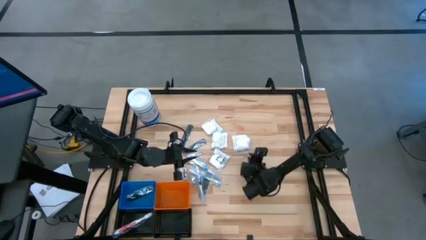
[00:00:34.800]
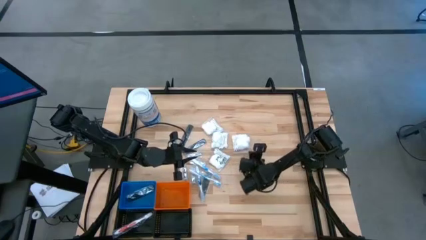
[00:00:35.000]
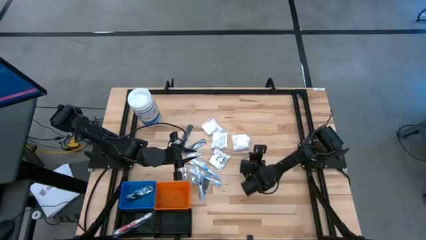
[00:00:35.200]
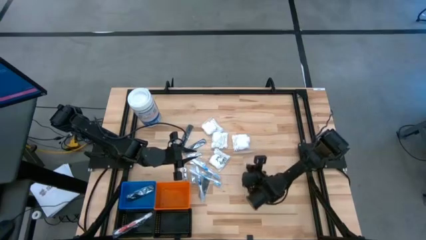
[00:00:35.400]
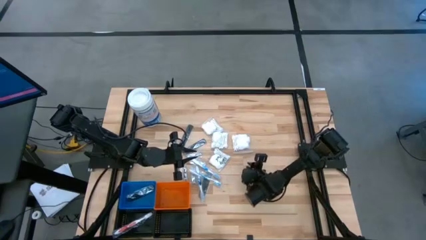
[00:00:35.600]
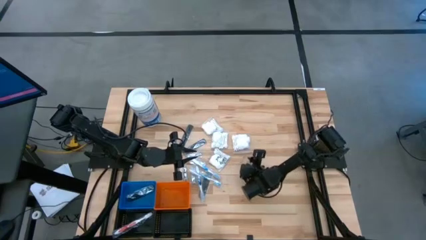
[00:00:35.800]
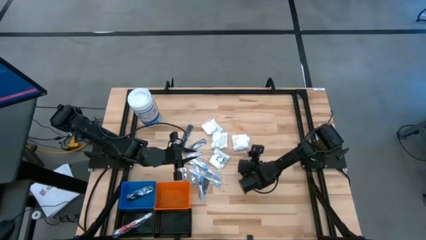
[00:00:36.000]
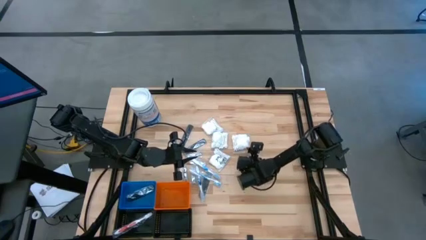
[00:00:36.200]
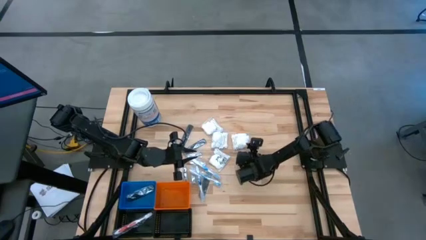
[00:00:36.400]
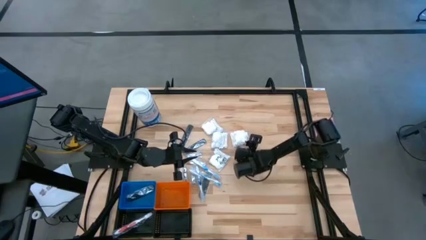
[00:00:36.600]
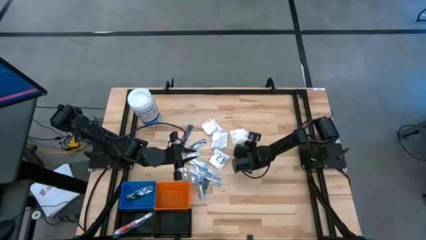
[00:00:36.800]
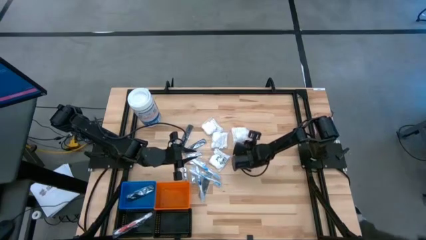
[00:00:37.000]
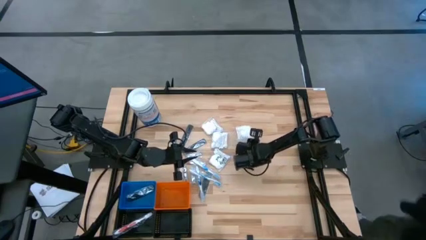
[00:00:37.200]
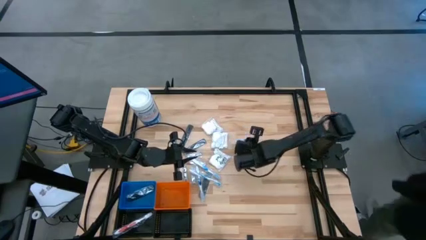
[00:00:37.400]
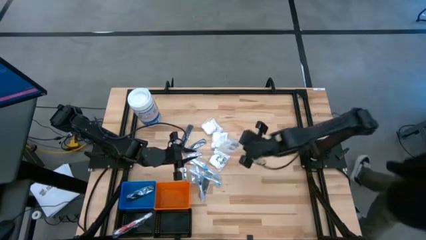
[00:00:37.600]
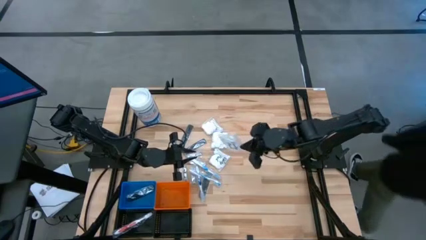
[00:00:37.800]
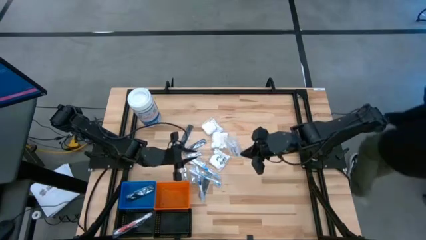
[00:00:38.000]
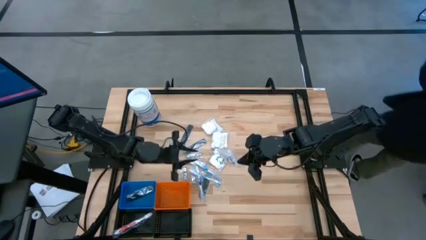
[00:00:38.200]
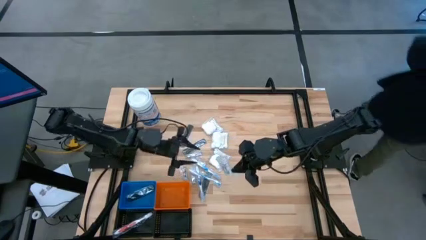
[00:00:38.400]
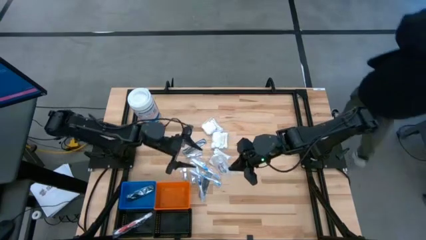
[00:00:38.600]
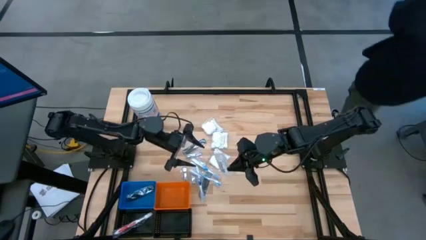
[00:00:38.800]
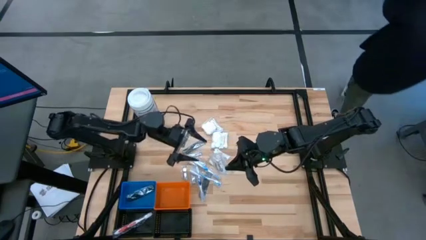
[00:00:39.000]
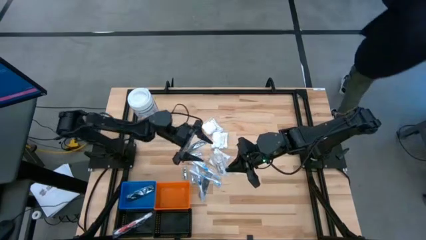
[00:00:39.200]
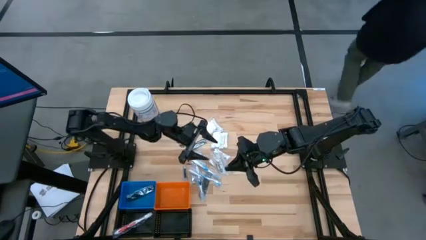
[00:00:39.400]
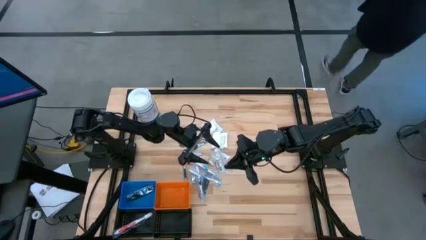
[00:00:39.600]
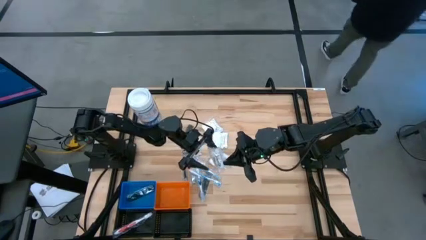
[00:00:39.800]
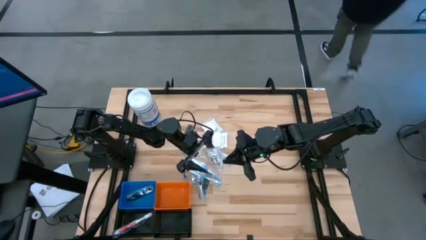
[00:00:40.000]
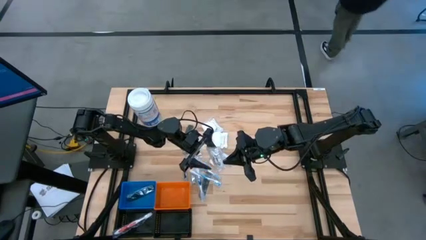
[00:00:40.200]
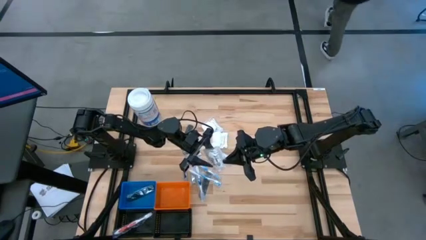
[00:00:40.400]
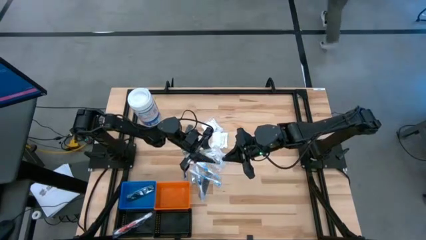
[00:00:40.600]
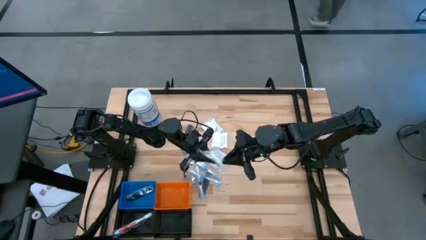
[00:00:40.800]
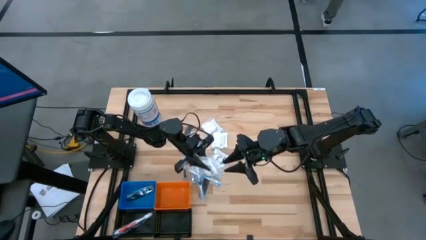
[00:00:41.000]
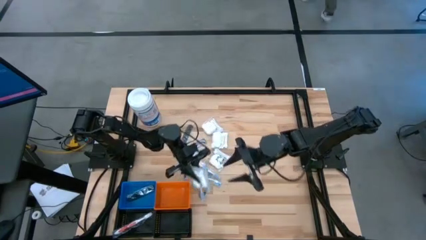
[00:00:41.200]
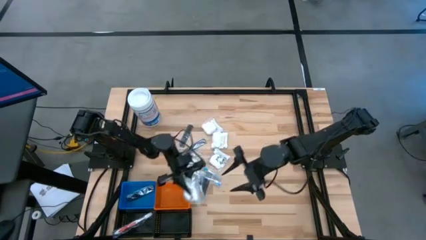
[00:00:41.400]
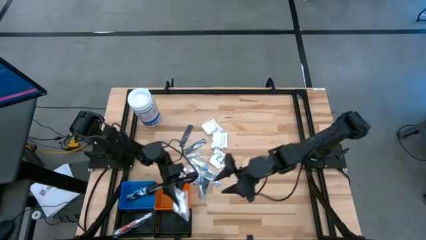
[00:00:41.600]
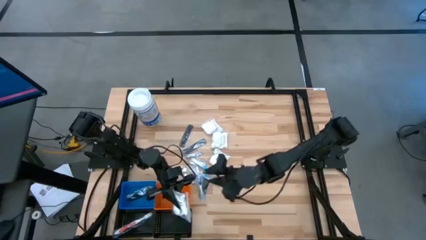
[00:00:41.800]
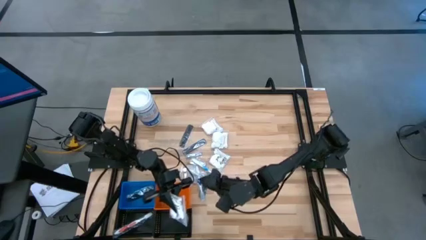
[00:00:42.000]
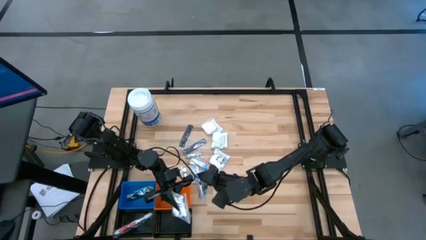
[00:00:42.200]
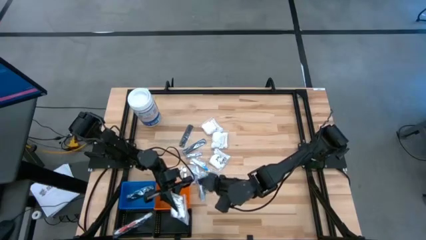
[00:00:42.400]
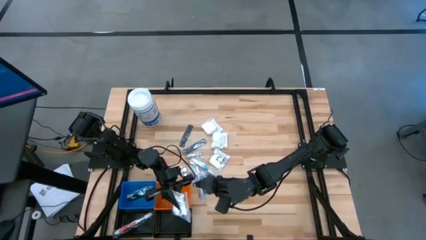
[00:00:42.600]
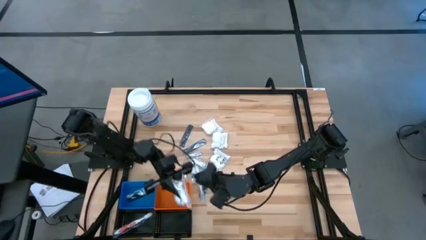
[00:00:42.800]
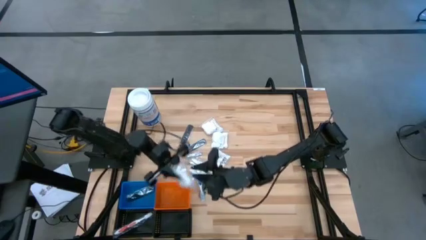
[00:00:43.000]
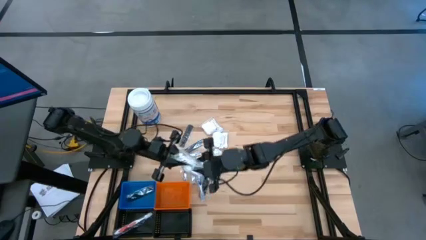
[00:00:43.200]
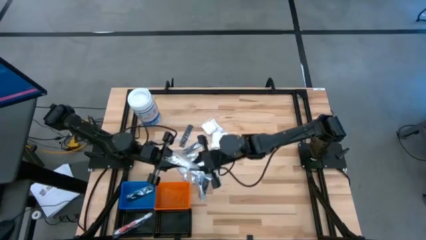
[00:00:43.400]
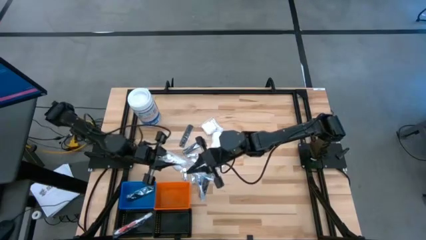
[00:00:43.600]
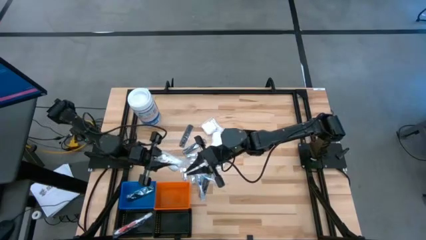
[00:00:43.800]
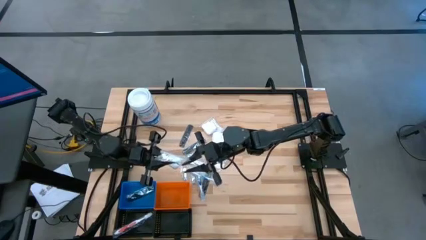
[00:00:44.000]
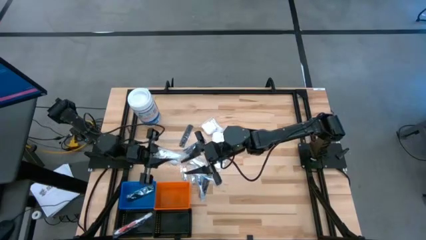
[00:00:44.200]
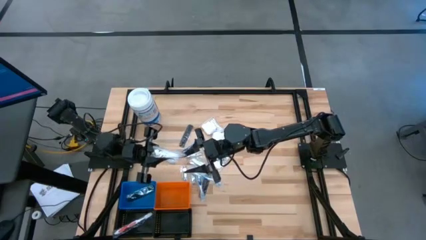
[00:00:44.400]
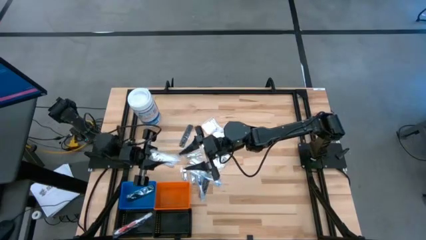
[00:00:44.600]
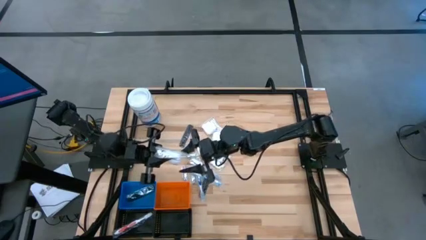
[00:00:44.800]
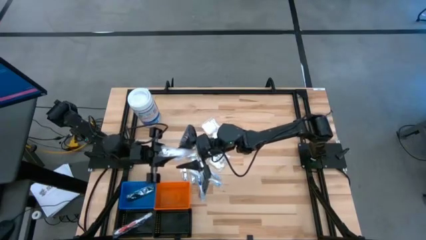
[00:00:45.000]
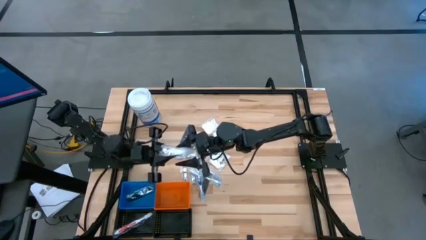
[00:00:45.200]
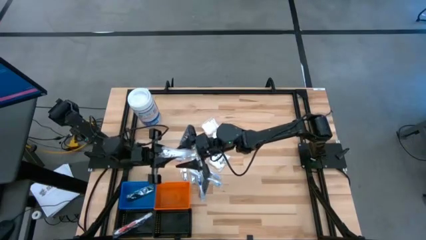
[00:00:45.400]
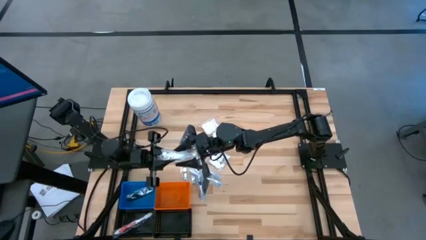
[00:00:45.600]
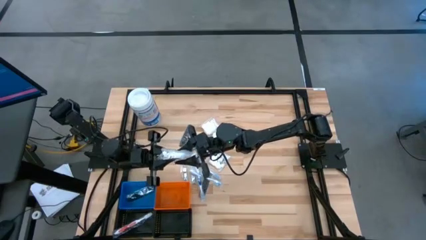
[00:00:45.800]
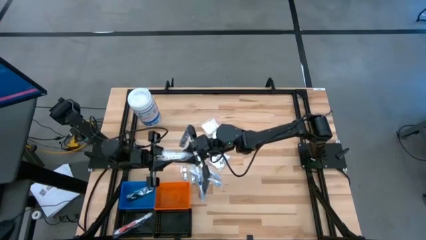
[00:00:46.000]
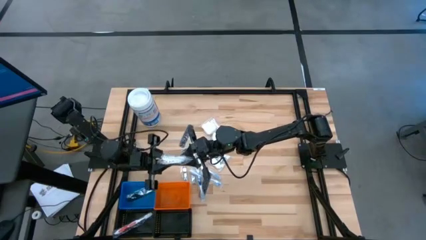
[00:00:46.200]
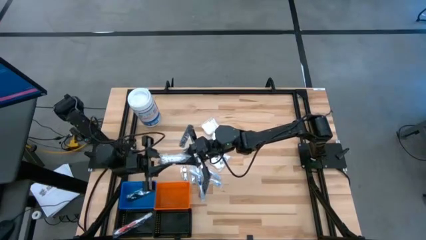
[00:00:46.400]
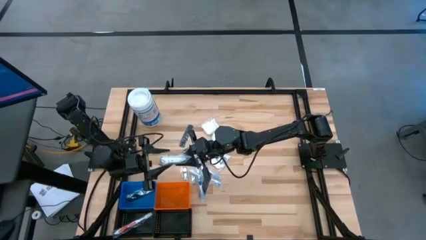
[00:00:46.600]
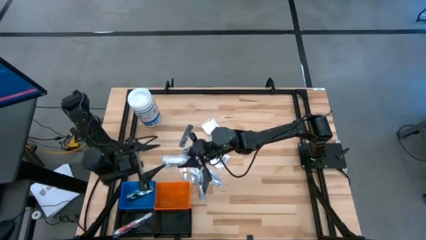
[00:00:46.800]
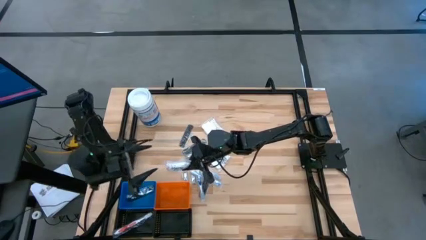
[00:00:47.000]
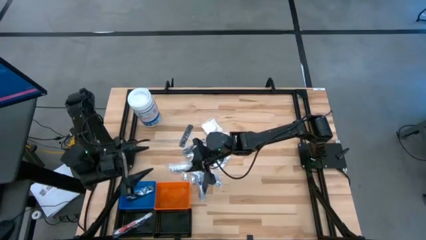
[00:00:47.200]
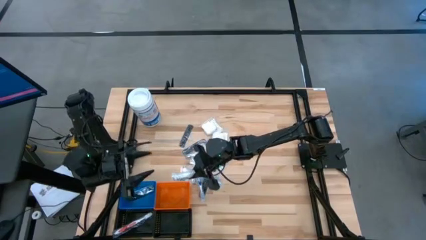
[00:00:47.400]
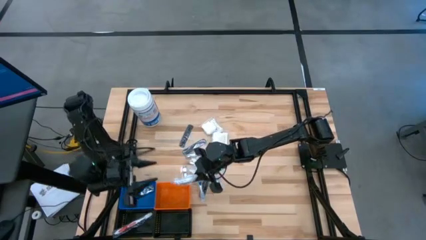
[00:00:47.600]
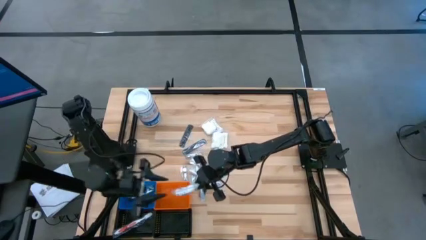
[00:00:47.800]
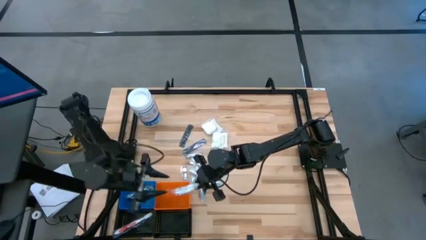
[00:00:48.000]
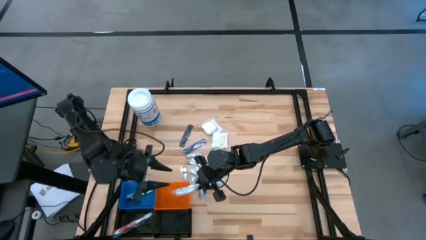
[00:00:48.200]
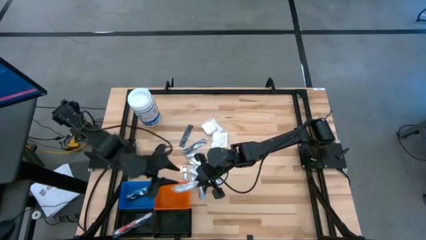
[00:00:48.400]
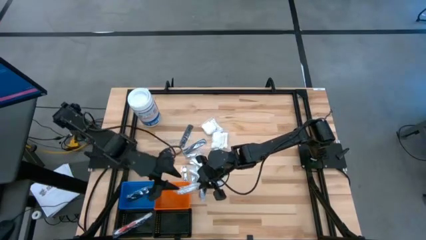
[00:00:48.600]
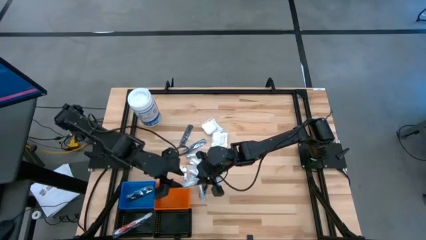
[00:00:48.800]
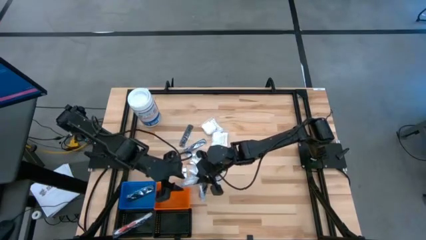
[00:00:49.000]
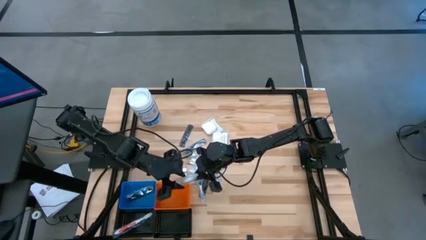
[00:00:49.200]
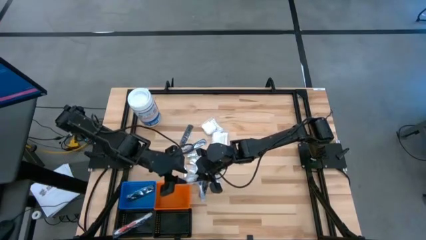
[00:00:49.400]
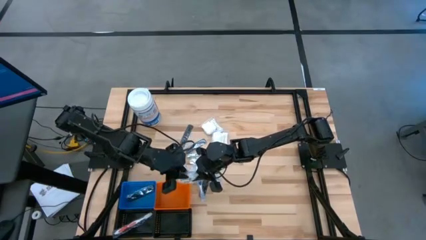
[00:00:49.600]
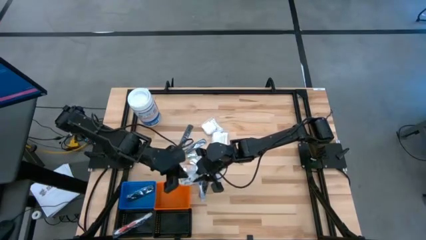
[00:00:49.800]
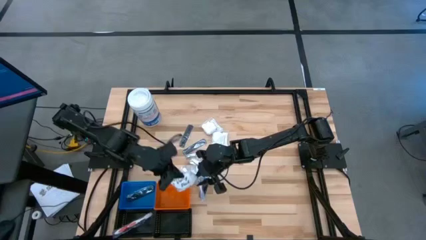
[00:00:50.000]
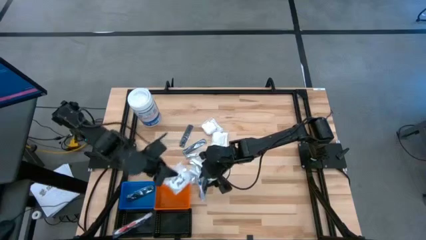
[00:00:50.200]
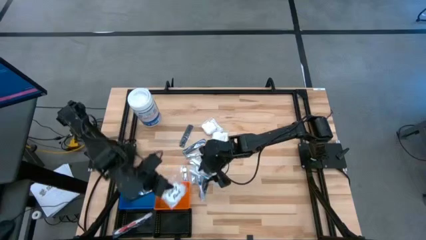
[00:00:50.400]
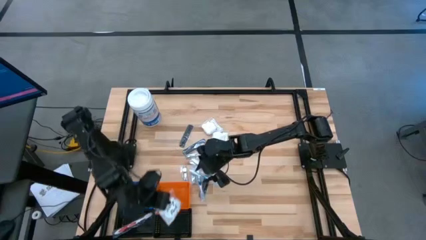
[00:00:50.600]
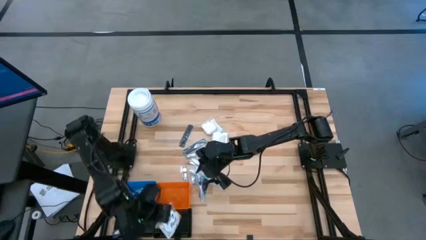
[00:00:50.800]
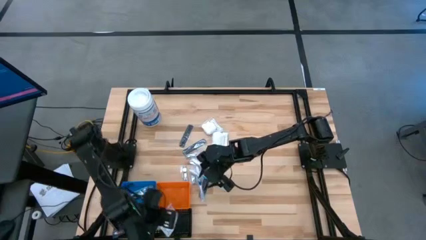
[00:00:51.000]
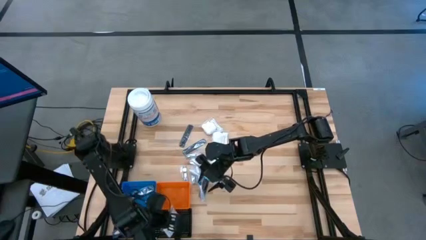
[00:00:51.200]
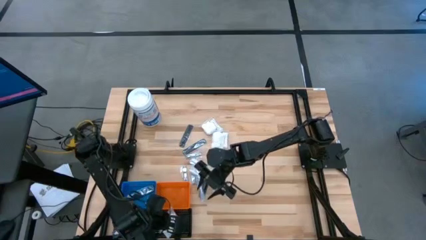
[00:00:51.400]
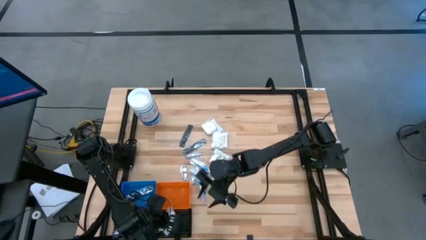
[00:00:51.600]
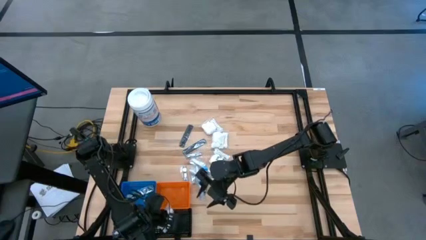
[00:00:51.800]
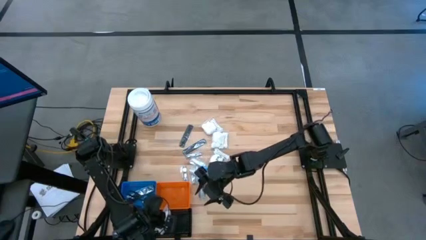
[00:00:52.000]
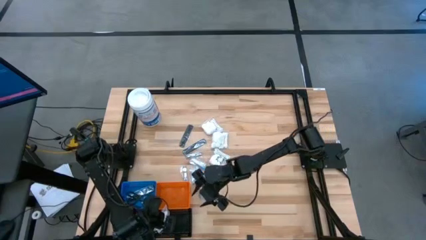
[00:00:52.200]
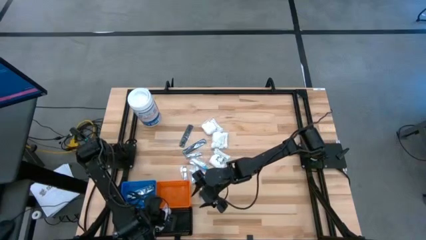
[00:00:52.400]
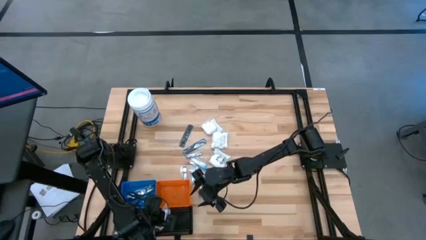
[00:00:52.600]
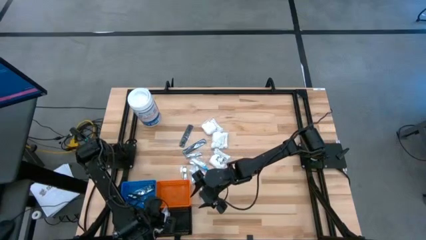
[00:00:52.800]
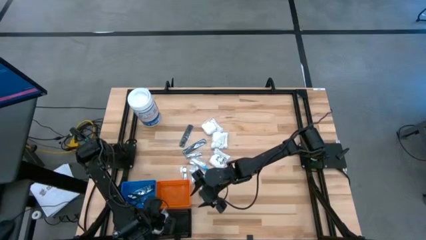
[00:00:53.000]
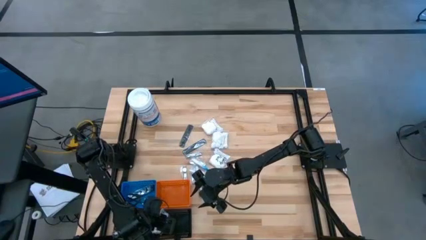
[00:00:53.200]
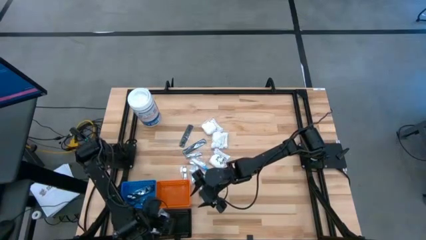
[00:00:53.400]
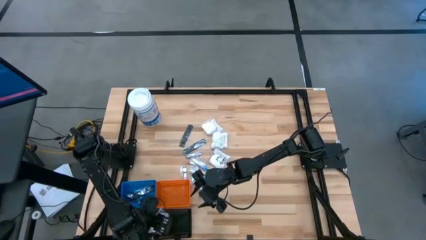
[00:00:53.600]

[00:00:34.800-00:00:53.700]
Task: Pick & Place Travel size toiletries
Put the right cotton pack into the right black basket
